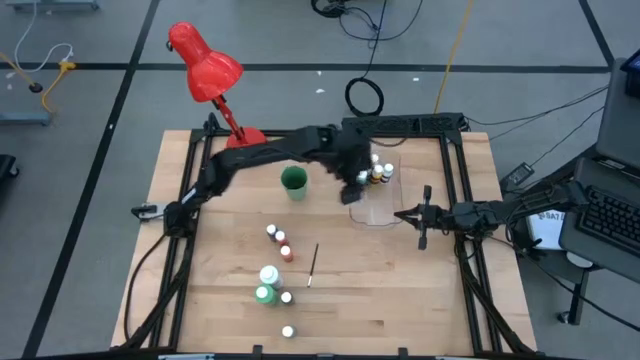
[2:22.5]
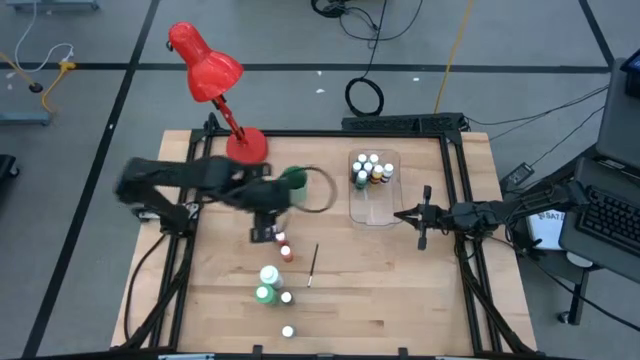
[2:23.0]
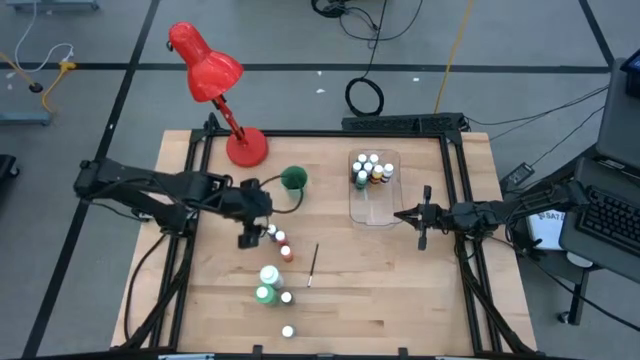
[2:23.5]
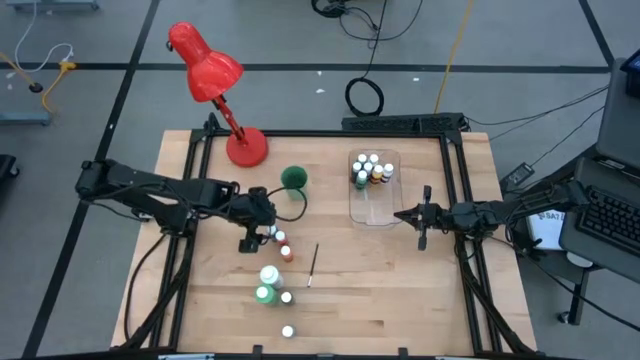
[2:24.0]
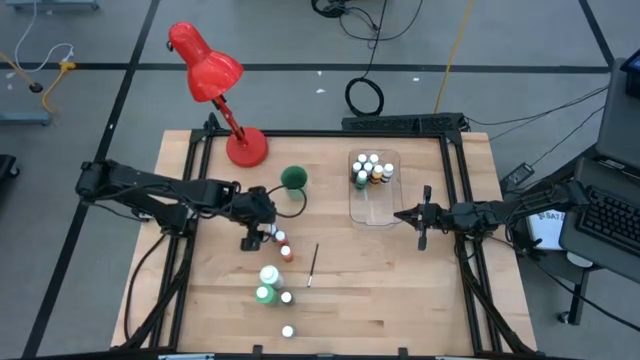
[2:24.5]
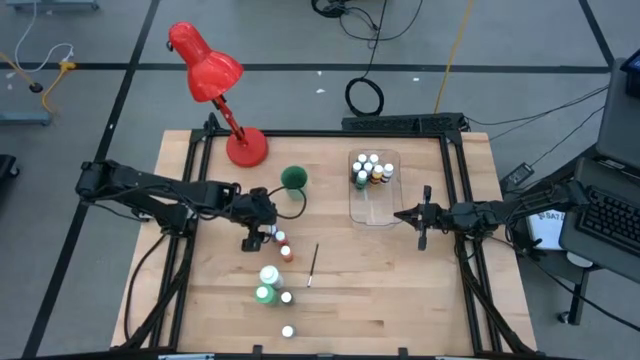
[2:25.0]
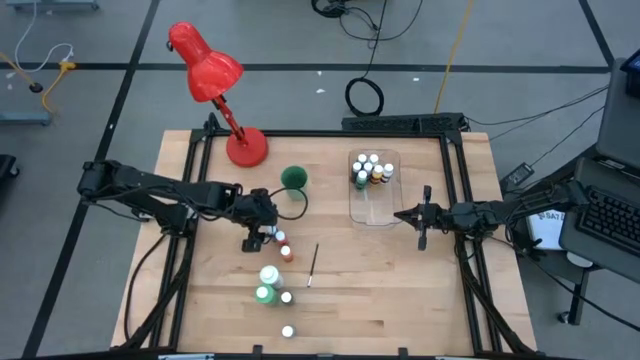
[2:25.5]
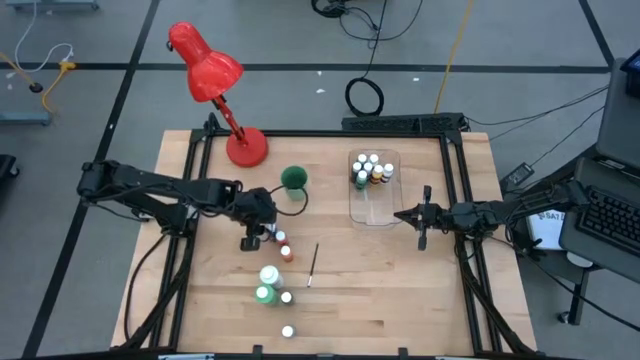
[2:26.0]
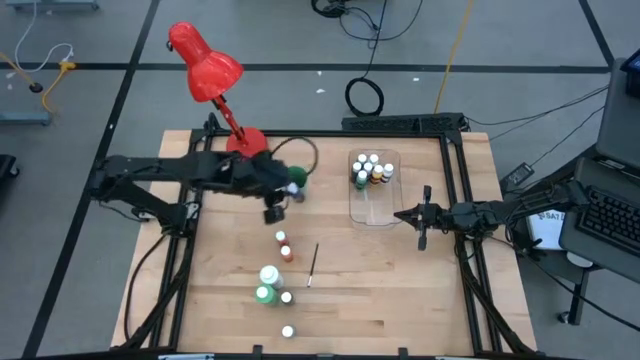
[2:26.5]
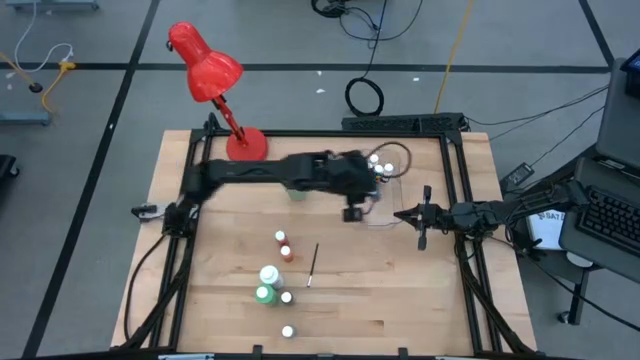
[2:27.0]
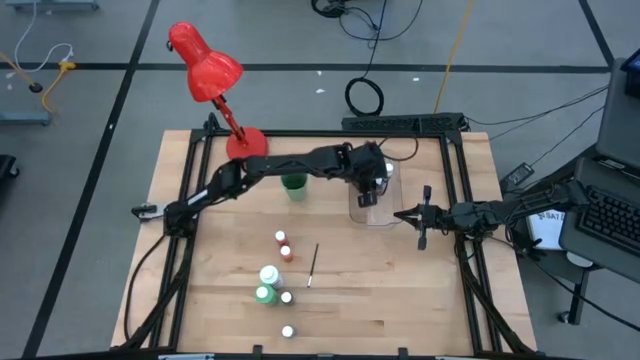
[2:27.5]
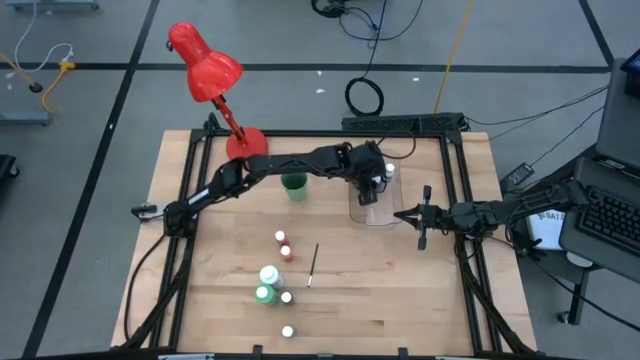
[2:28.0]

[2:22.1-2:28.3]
Task: Pick & Place Paint Supplies
Put the dark blue paint bottle into the transparent bin

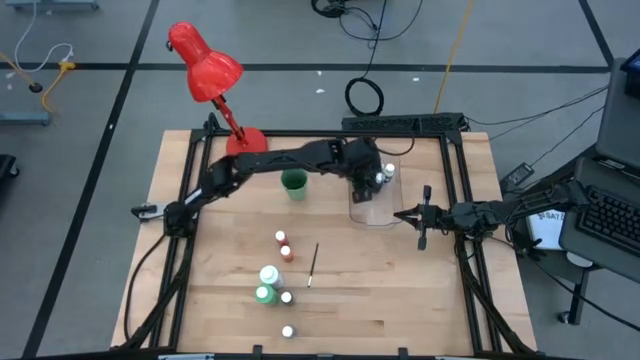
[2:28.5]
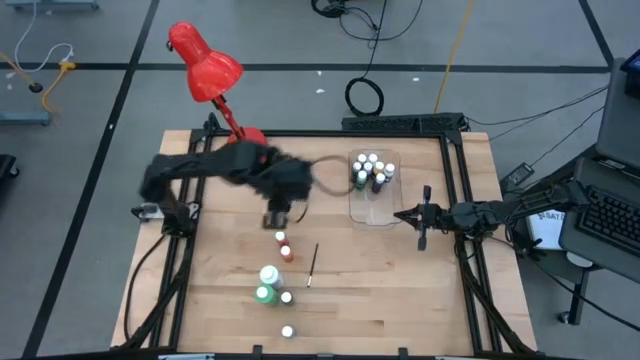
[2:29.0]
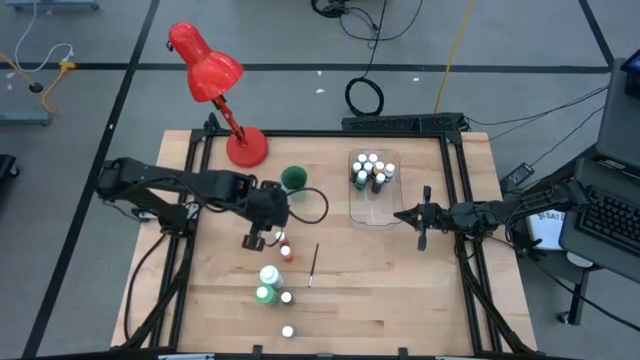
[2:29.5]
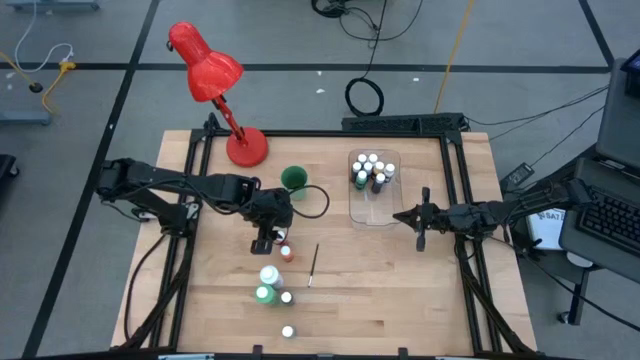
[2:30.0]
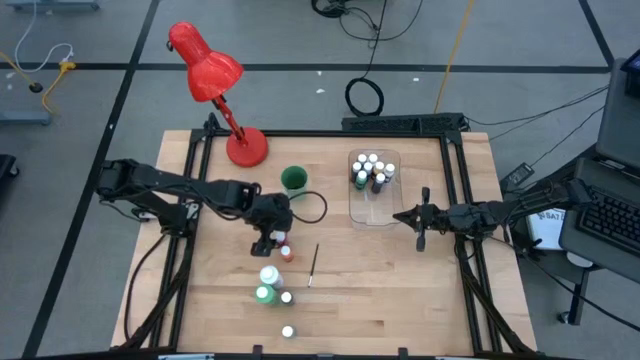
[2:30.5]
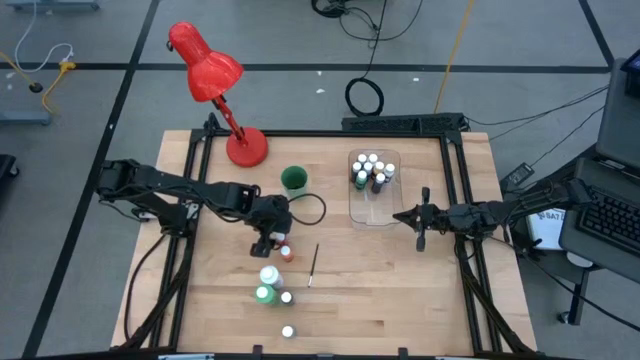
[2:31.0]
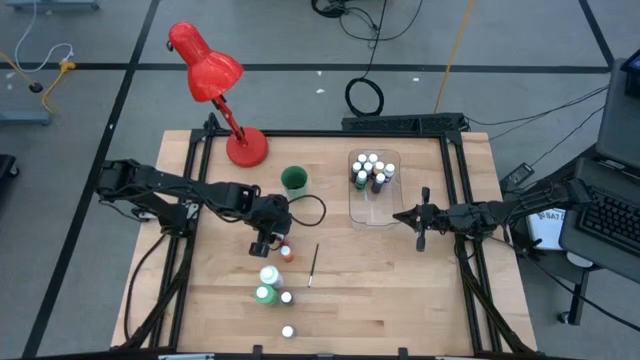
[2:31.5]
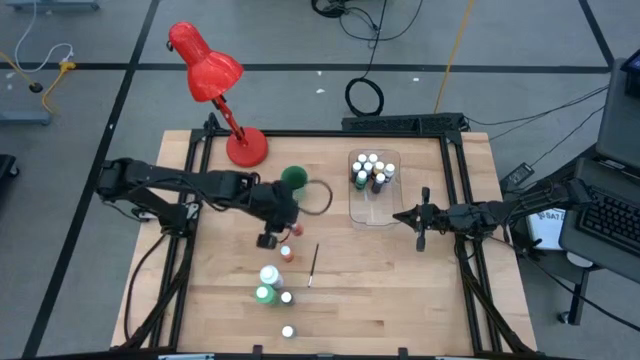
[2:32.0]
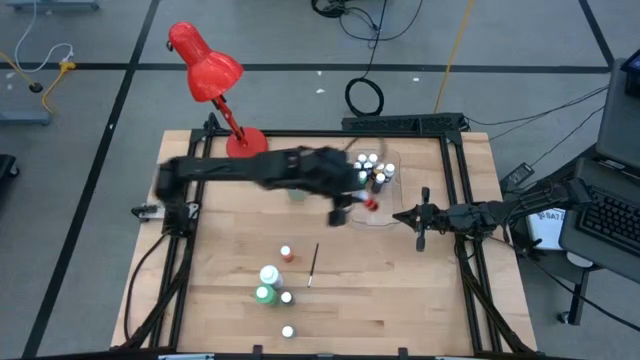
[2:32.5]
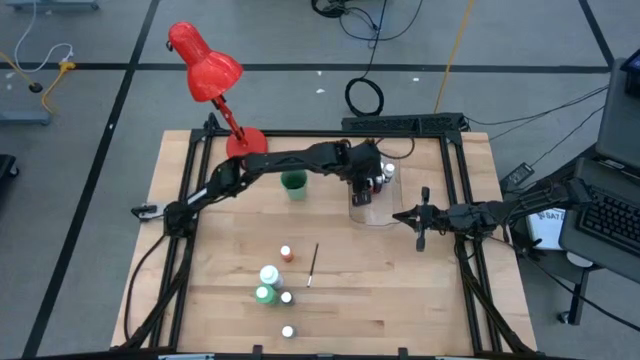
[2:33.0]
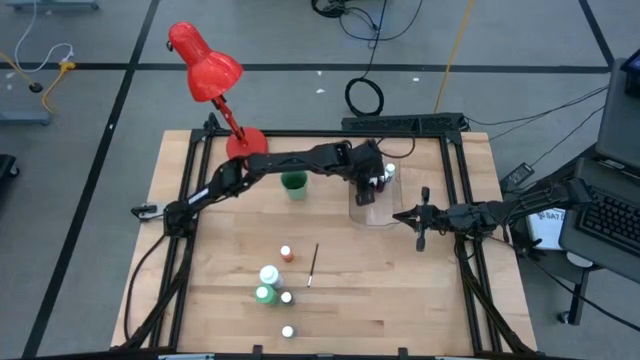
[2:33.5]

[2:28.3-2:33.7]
Put the red paint bottle into the transparent bin

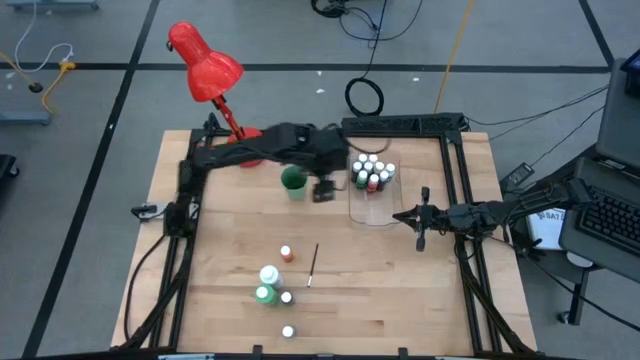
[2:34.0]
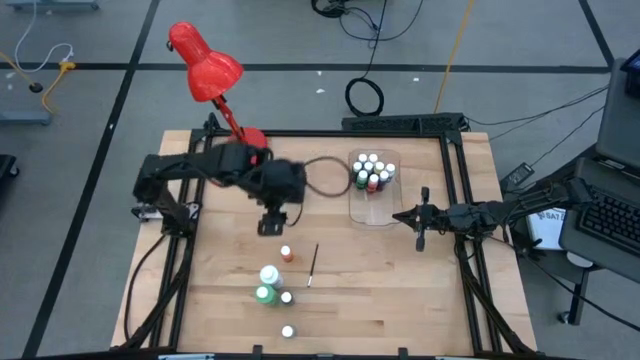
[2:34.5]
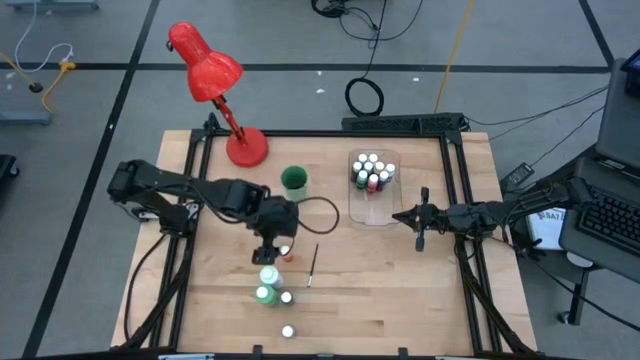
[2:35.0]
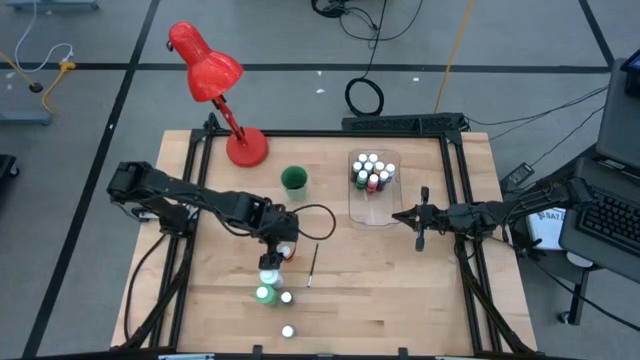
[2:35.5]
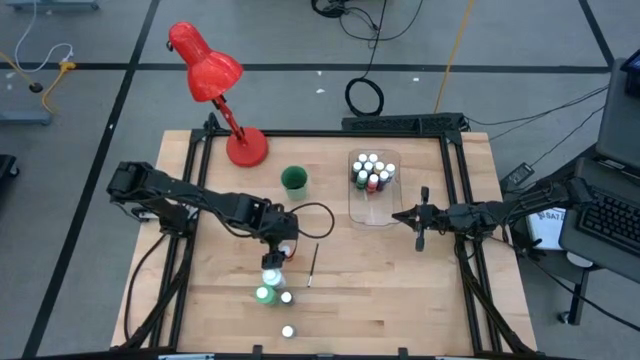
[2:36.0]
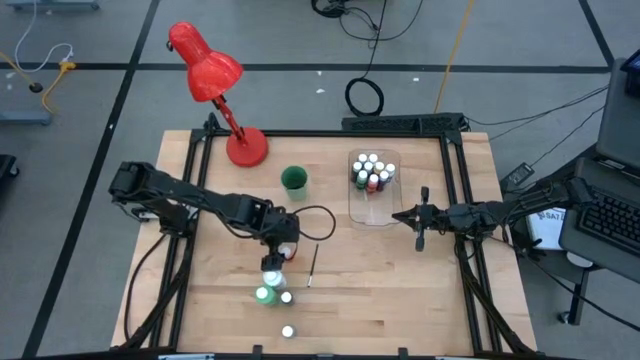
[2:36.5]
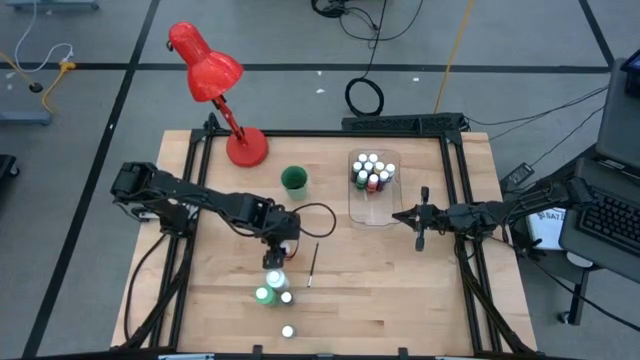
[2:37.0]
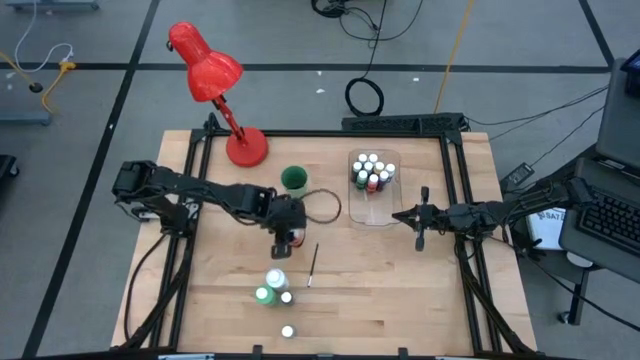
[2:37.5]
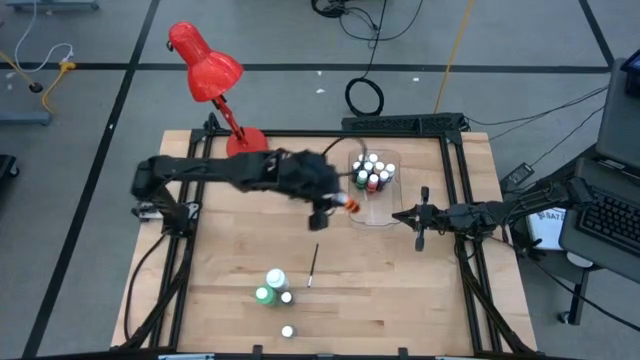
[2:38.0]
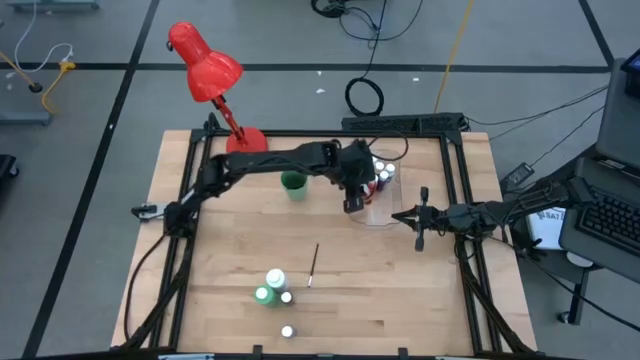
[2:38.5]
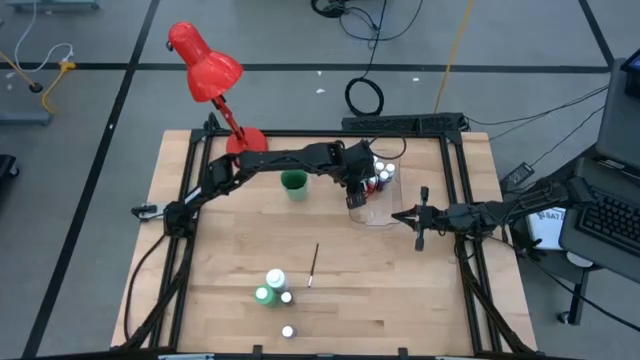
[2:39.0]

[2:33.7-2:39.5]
Put the orange paint bottle into the transparent bin

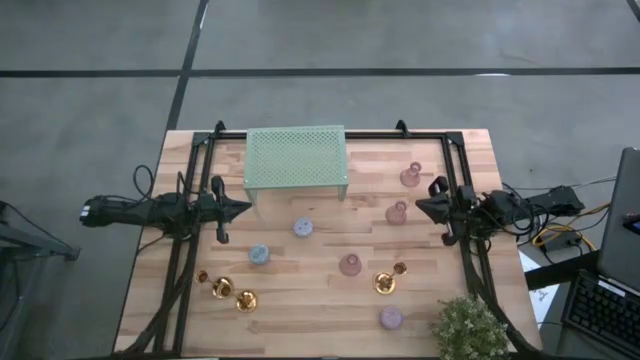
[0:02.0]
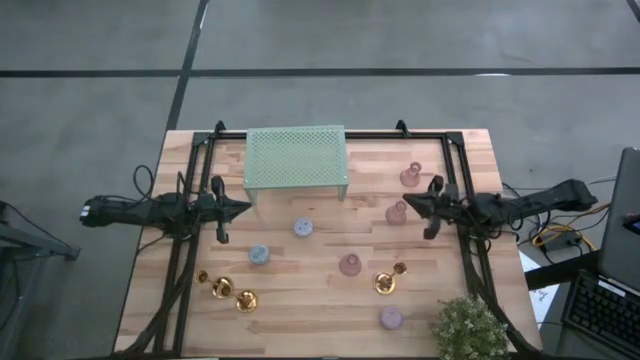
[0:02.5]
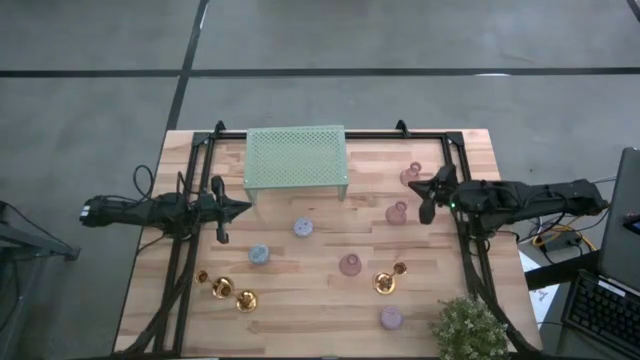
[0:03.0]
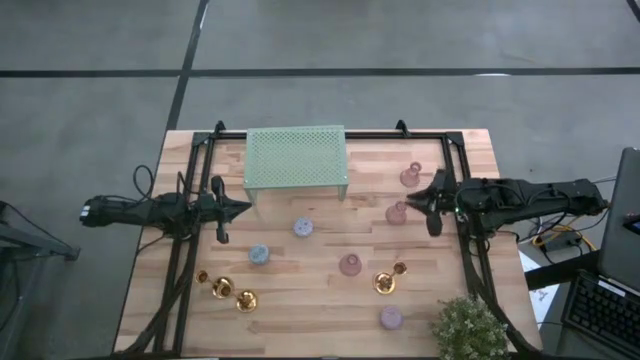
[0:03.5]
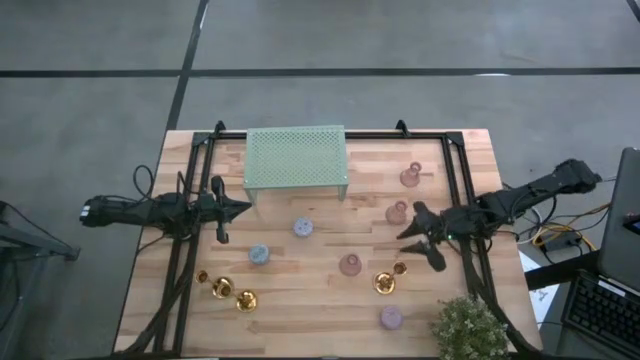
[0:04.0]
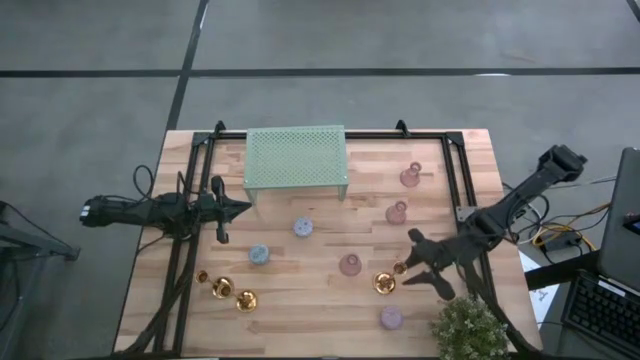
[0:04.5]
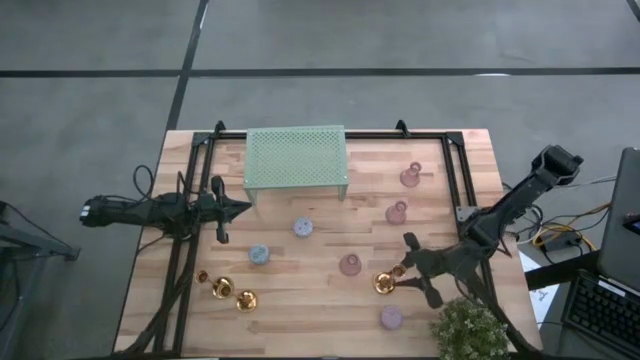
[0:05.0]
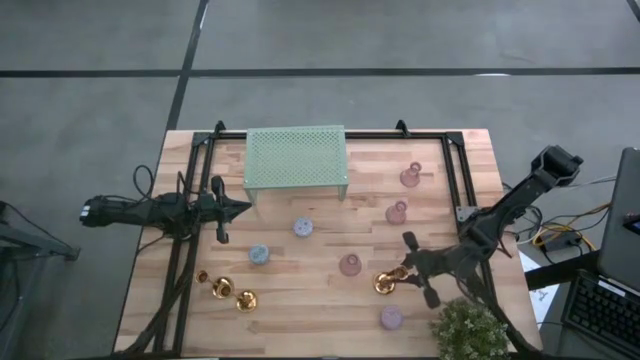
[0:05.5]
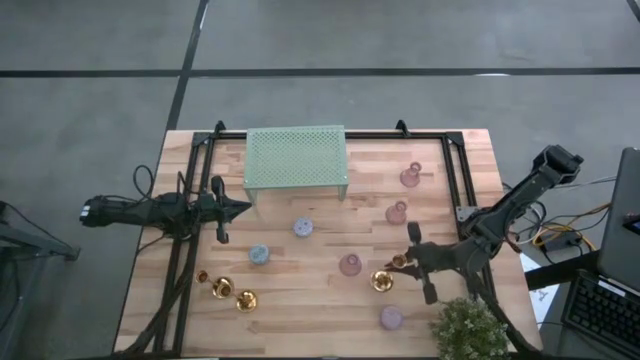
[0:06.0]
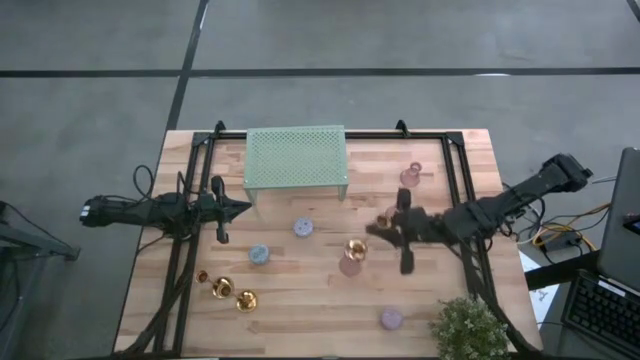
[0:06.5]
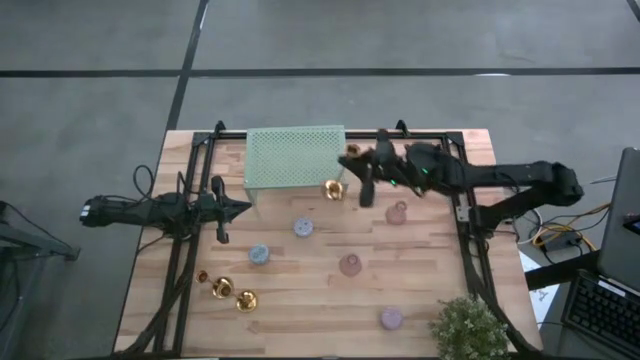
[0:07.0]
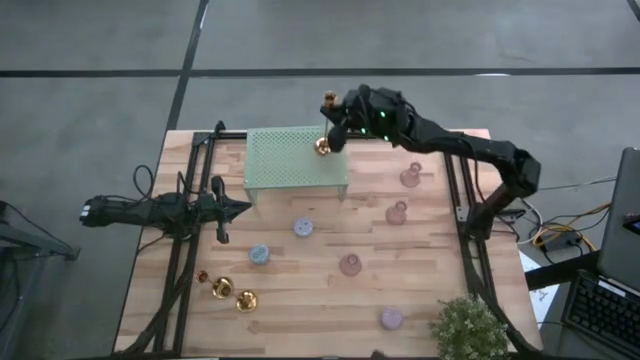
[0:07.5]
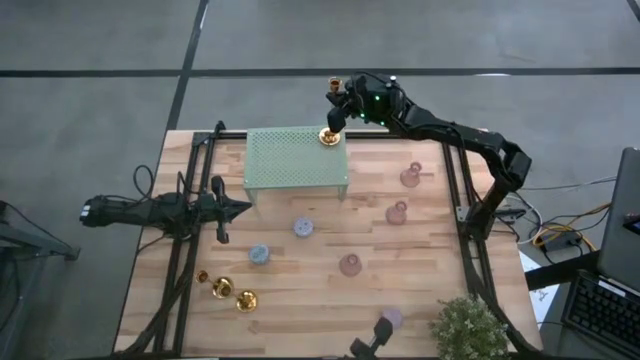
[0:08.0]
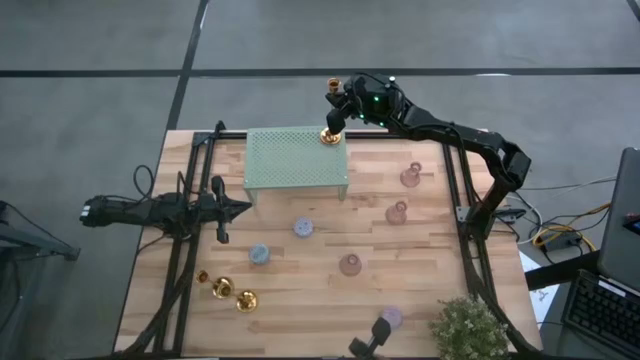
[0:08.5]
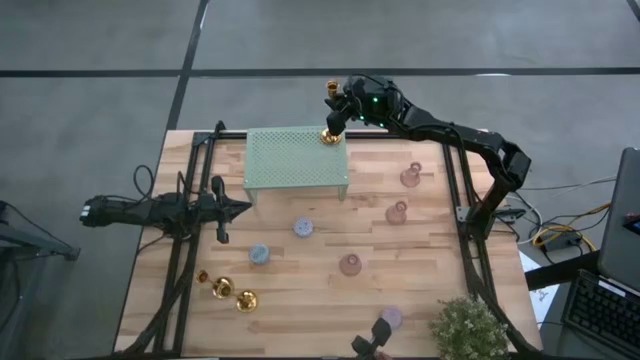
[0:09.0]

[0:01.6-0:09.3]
Task: Pick & Place candle stick holders
Put the right gold candle holder on the shelf
